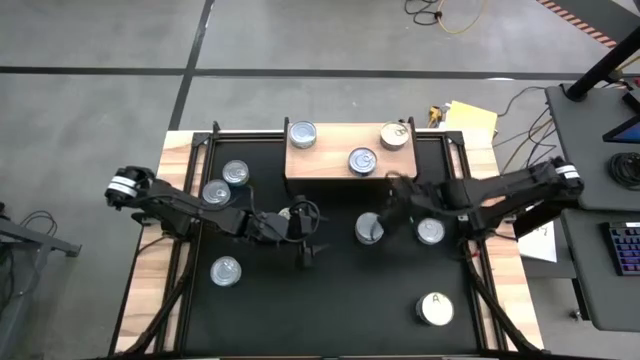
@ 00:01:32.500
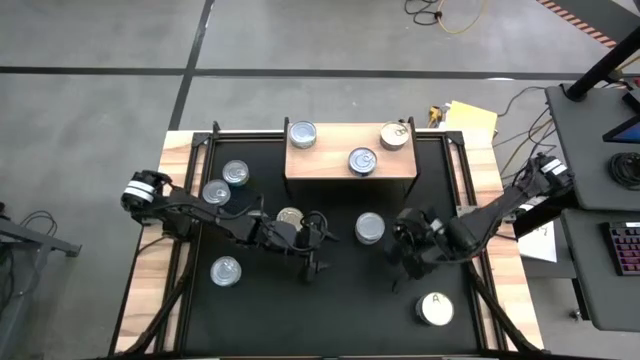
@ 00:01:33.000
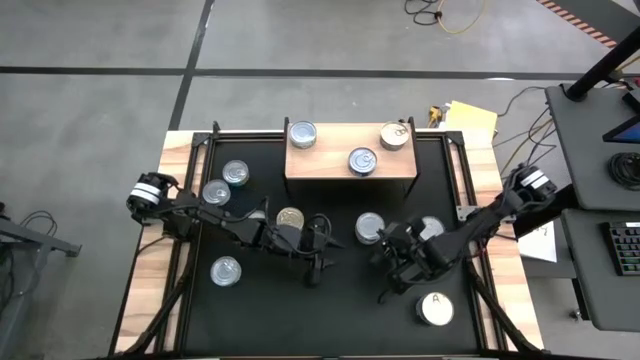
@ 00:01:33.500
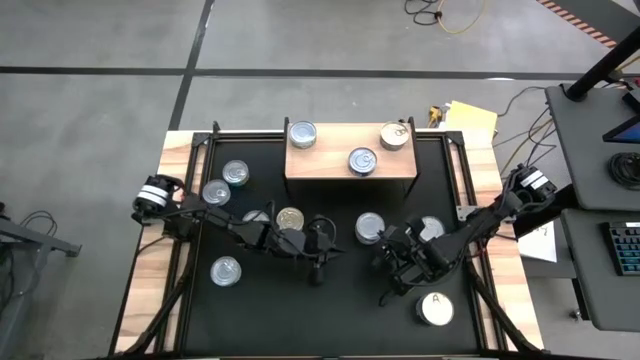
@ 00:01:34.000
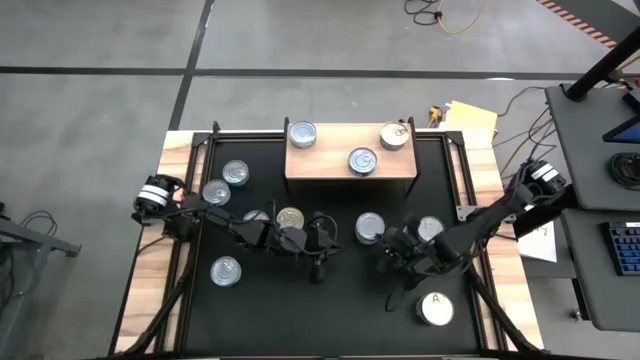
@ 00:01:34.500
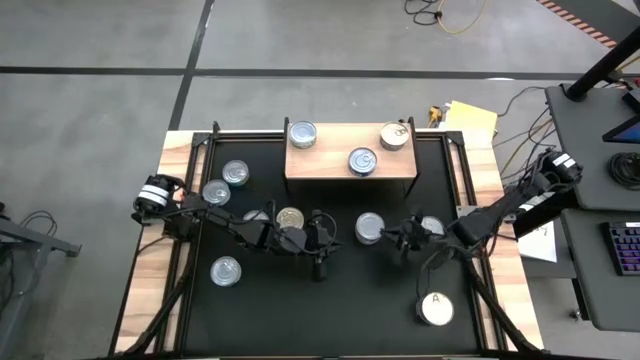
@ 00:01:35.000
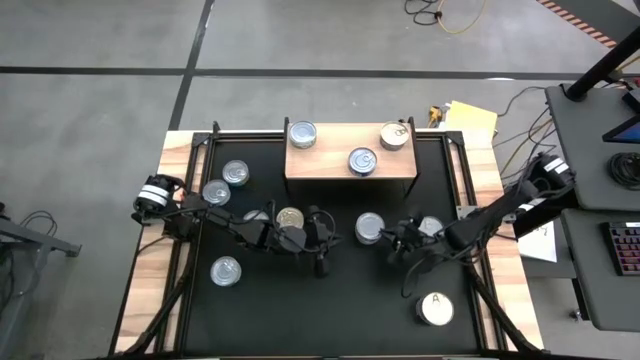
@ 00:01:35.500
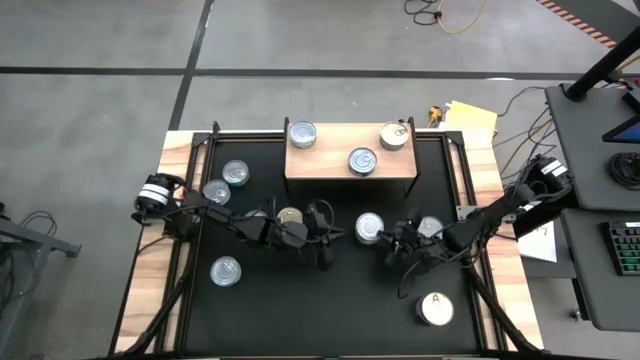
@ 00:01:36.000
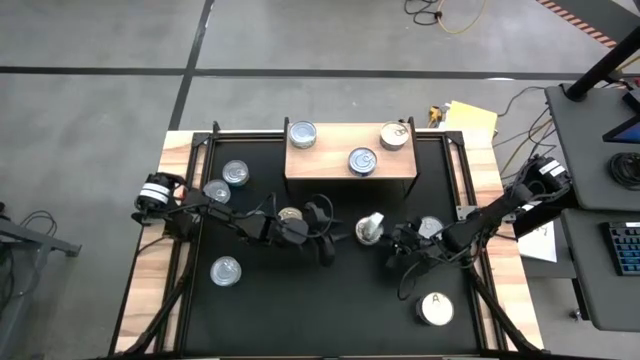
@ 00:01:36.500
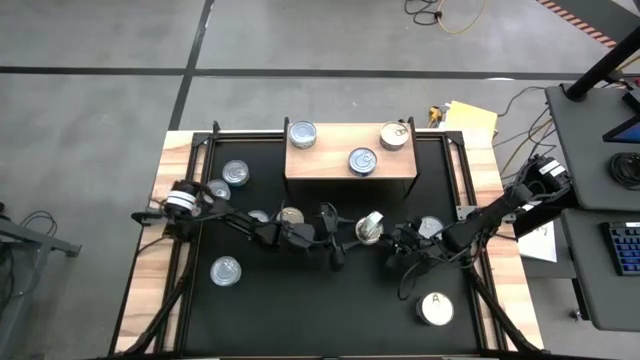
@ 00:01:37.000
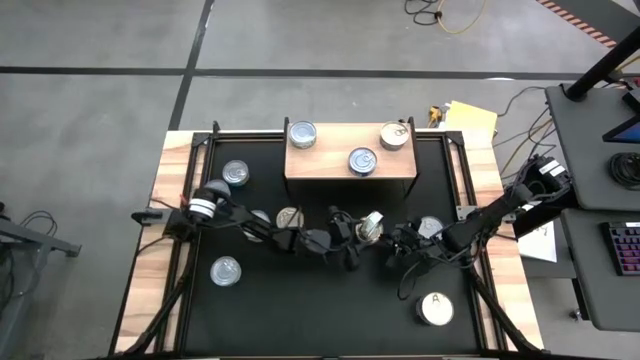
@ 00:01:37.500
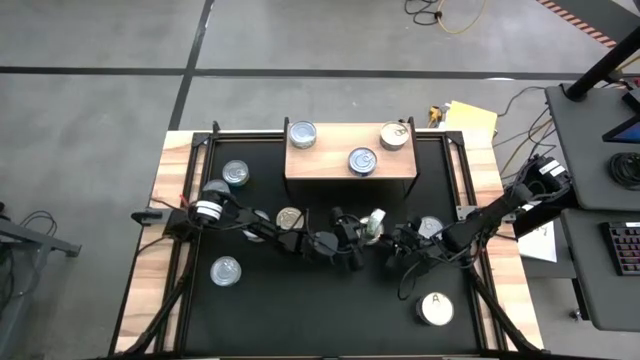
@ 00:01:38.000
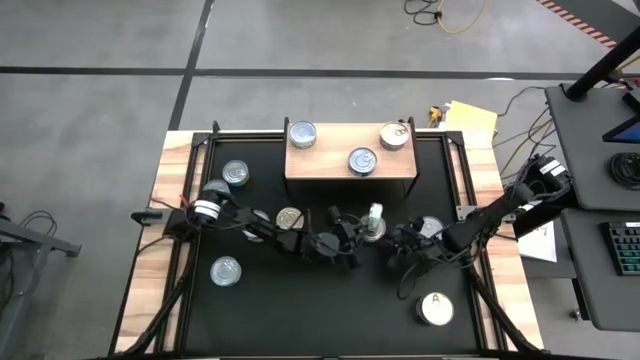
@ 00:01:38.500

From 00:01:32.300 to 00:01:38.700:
Task: Stack canned seafood by type on shelf
Stack the green white tuna can on top of the green white tuna can on the shelf

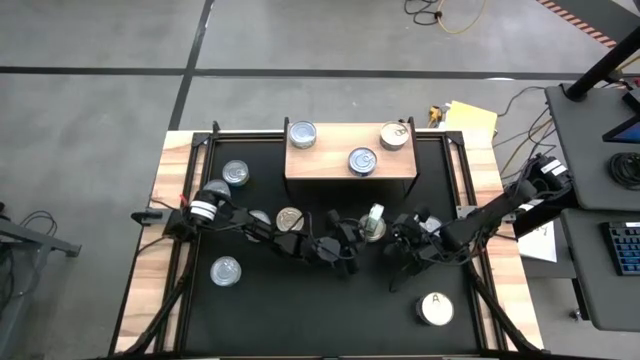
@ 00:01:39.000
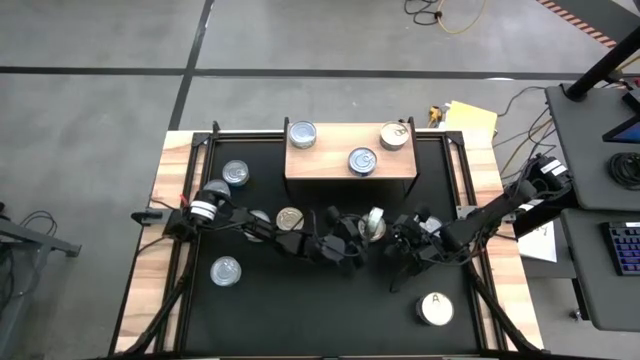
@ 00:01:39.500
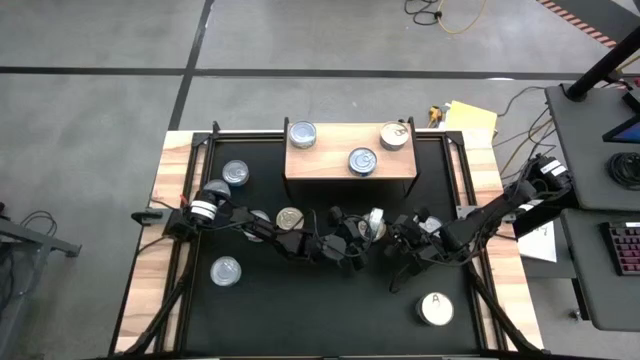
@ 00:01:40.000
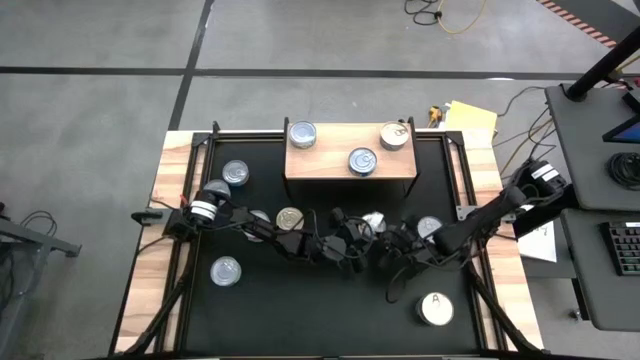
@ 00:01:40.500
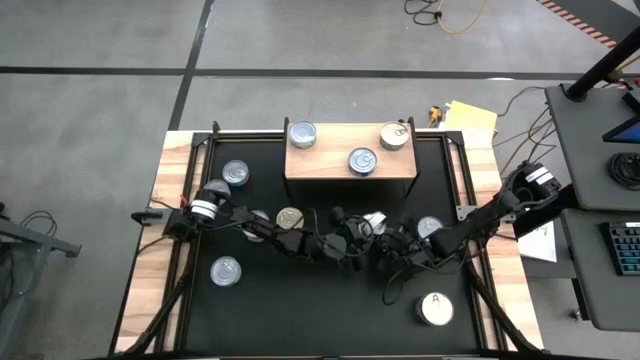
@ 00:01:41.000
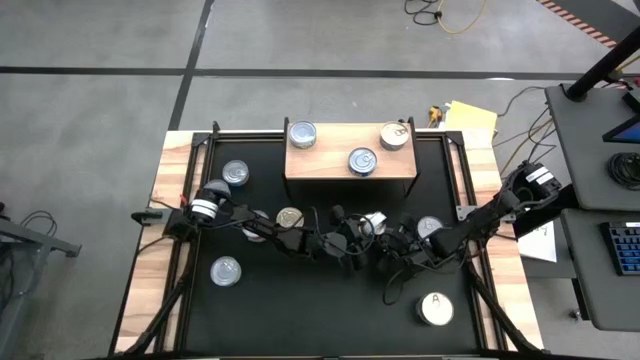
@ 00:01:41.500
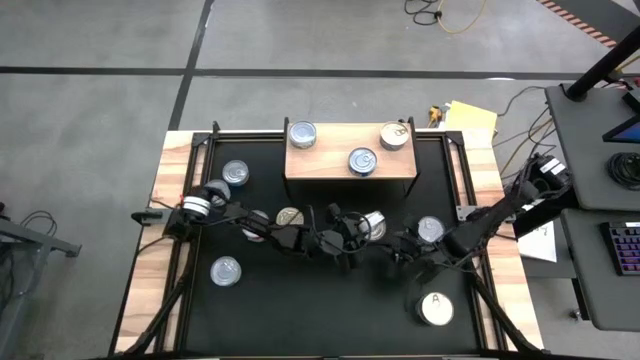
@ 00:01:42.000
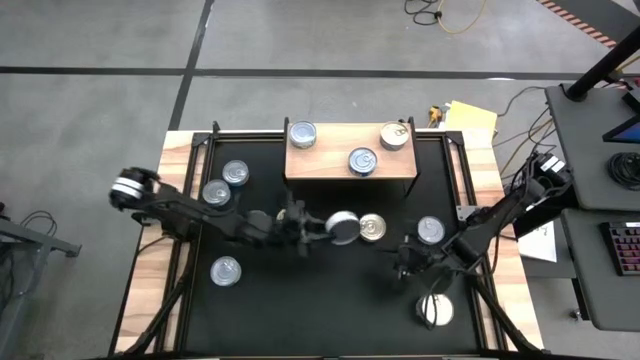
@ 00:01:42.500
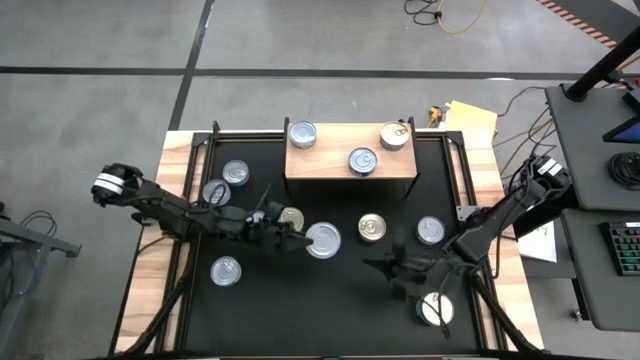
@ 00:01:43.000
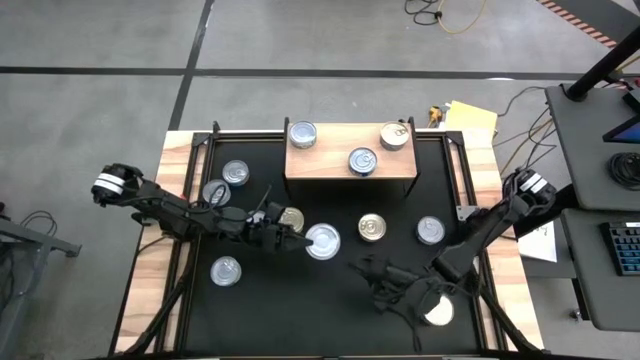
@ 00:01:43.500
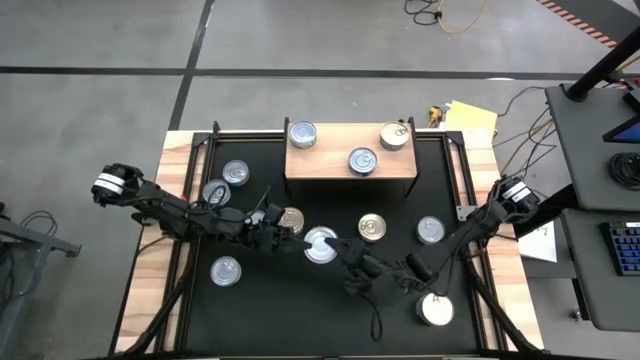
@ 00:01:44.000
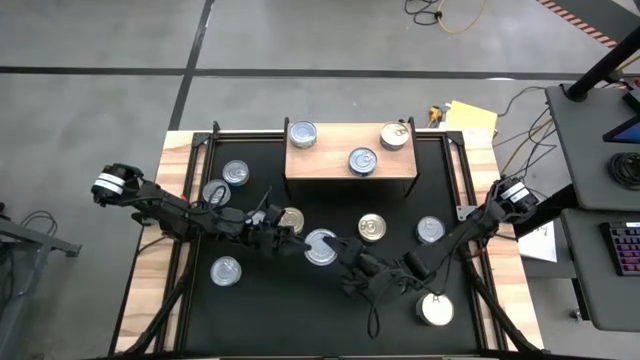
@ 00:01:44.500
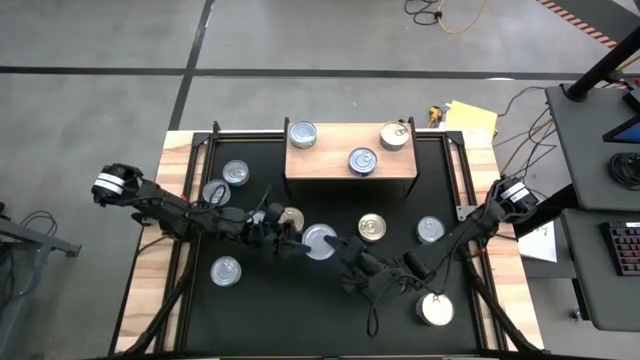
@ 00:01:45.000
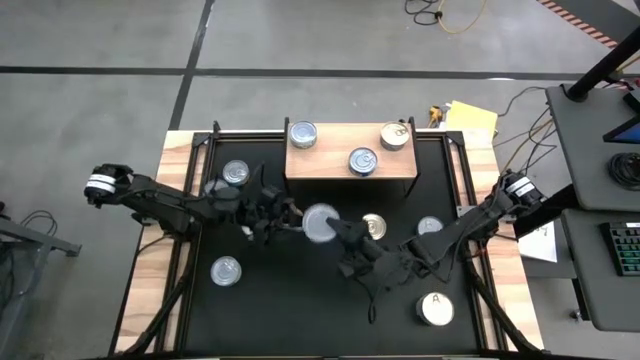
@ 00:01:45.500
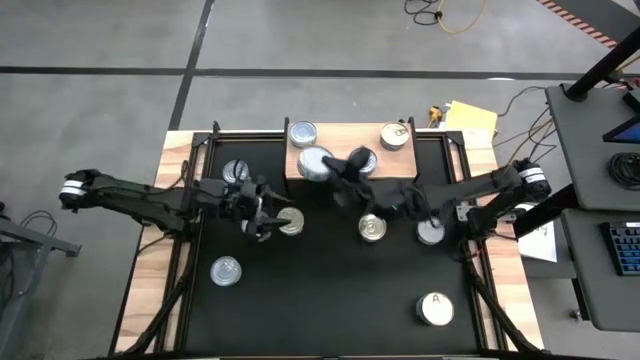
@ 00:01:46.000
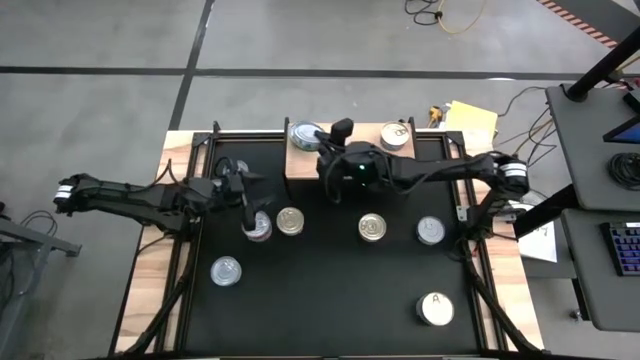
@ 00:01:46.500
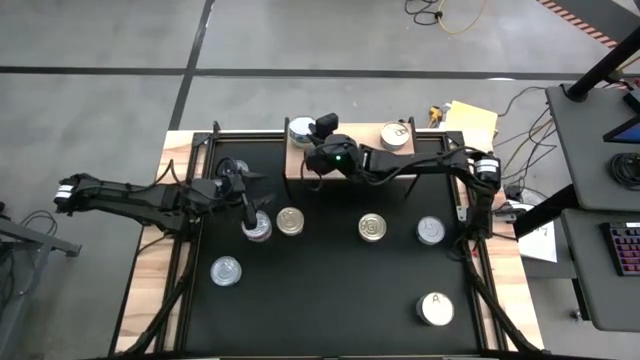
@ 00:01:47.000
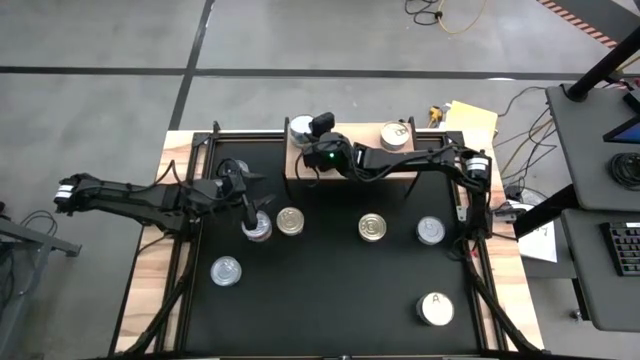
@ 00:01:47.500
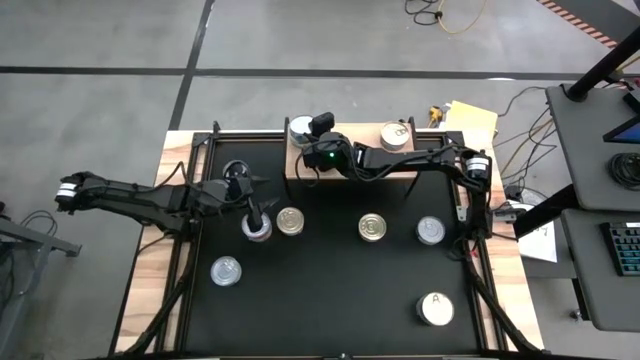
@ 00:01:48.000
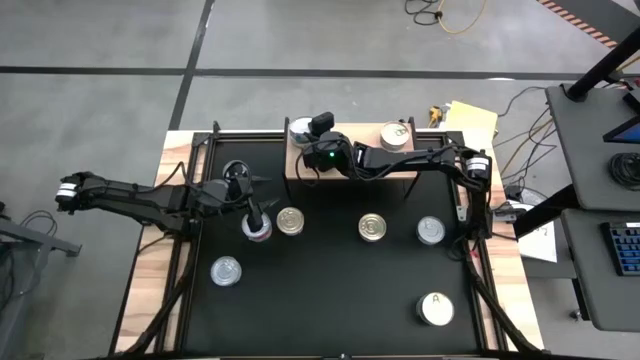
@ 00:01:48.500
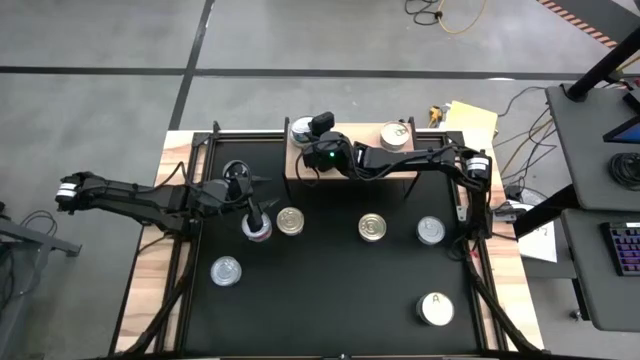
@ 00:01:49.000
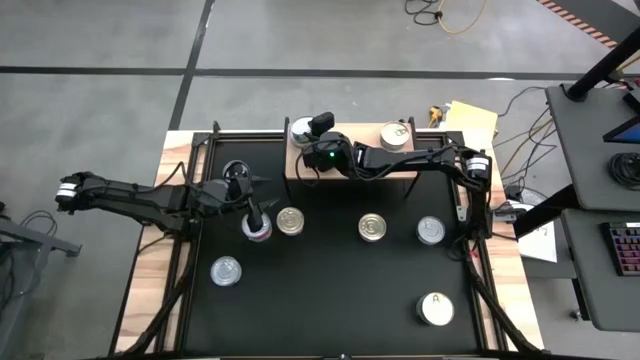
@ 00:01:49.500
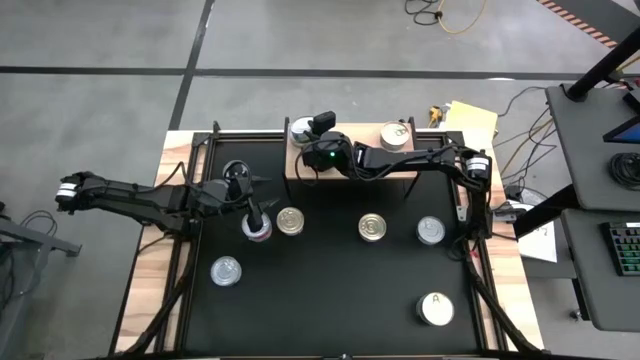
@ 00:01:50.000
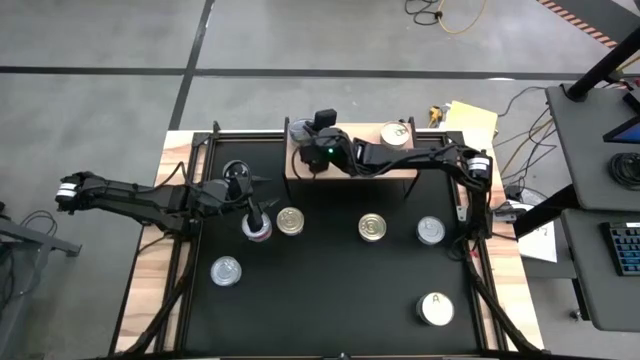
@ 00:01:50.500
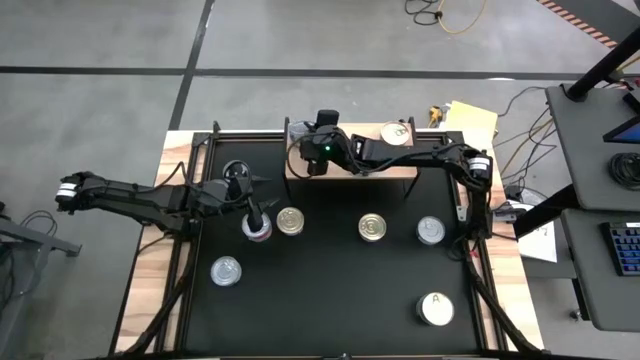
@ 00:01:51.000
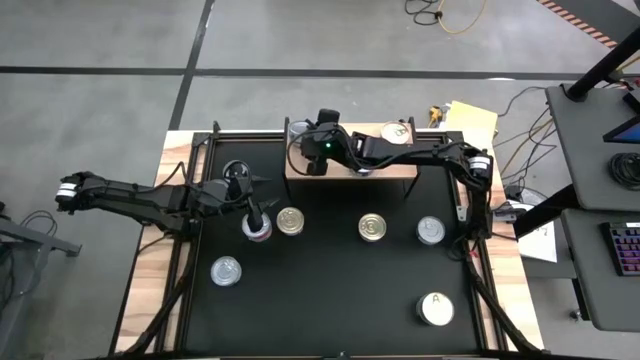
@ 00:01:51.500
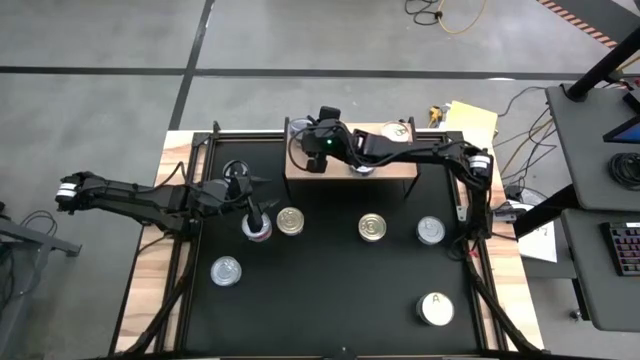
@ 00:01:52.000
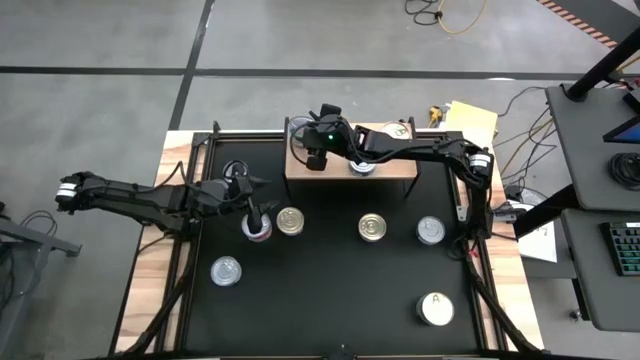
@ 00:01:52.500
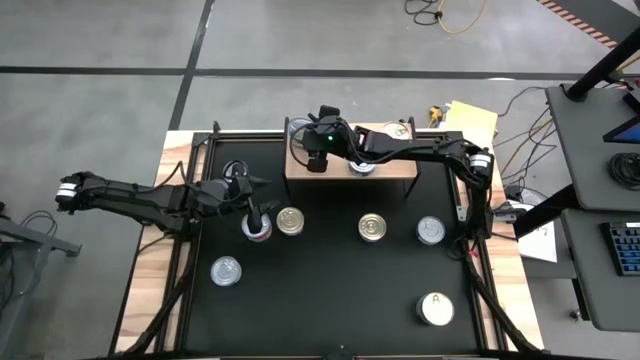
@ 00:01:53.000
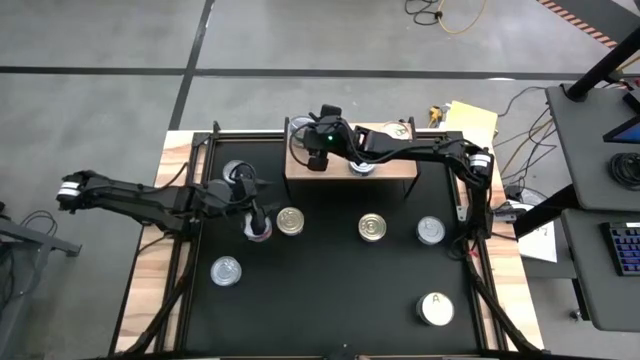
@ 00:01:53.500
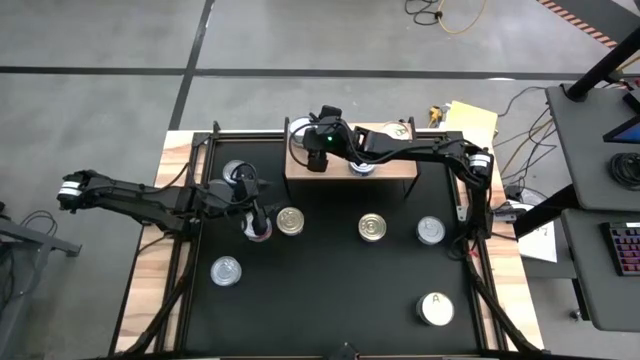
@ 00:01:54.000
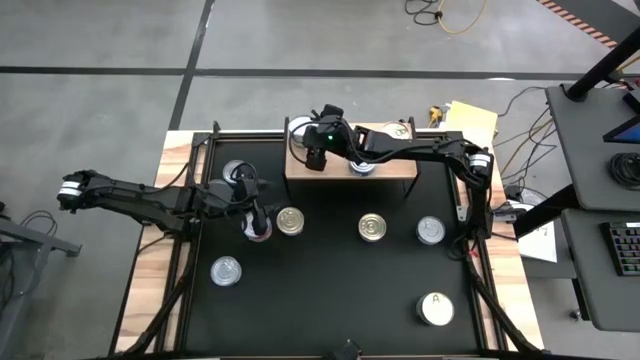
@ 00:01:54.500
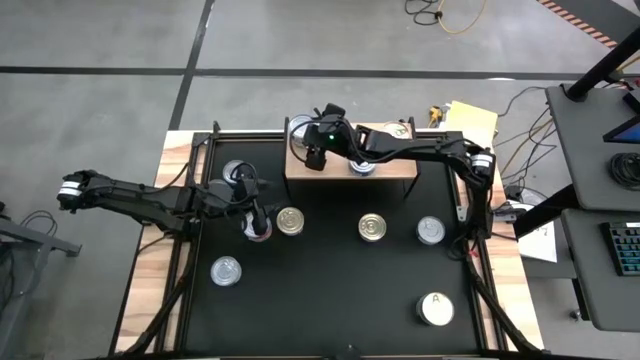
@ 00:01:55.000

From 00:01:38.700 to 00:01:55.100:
Stack the green white tuna can on top of the green white tuna can on the shelf
